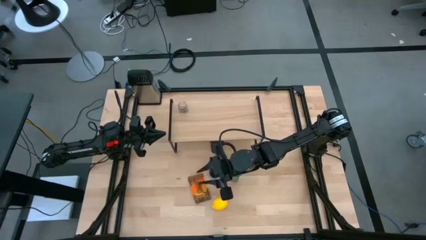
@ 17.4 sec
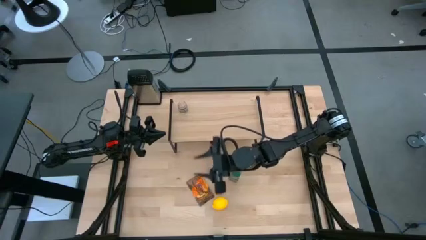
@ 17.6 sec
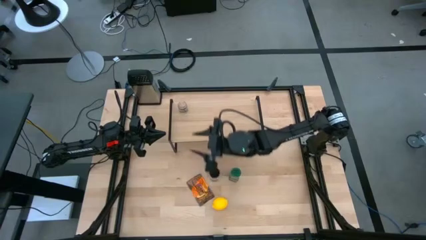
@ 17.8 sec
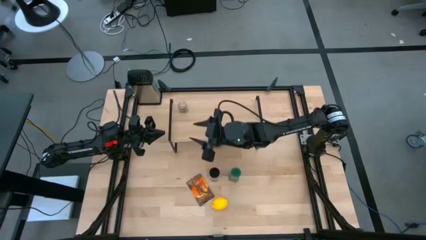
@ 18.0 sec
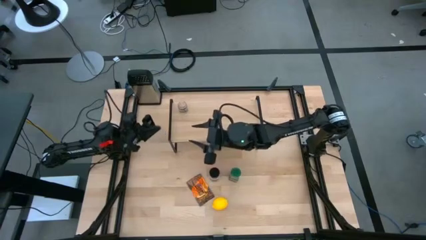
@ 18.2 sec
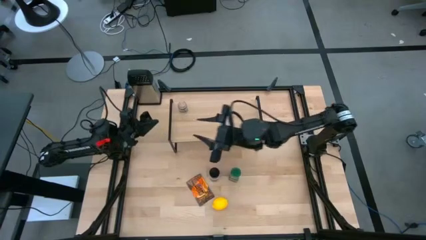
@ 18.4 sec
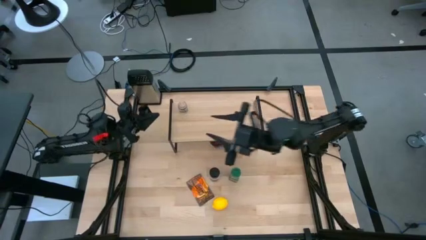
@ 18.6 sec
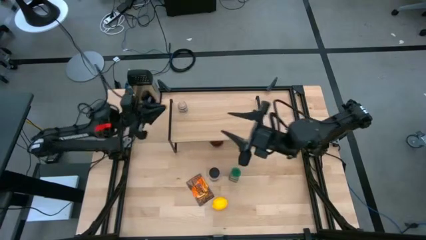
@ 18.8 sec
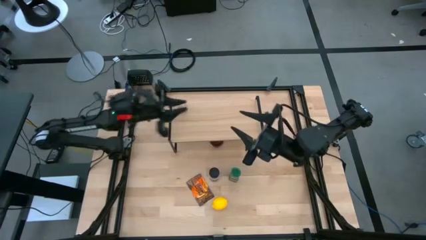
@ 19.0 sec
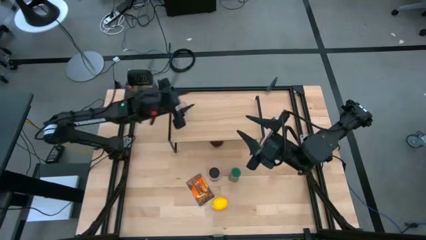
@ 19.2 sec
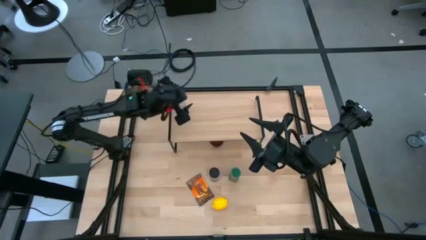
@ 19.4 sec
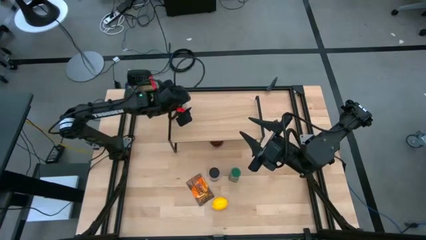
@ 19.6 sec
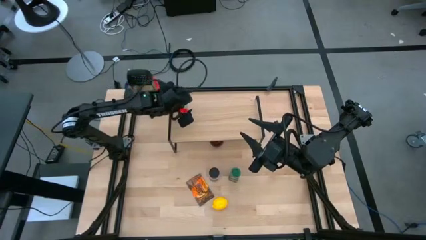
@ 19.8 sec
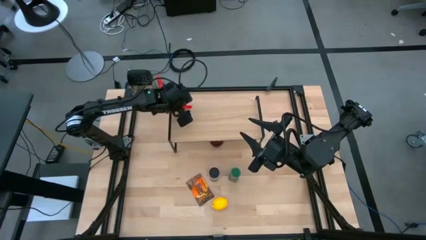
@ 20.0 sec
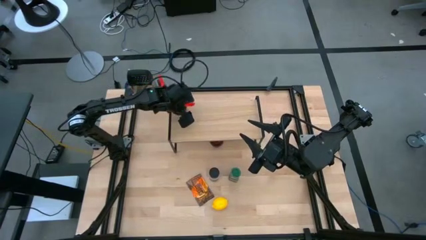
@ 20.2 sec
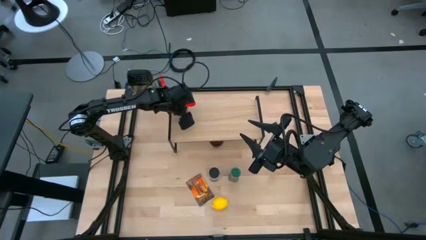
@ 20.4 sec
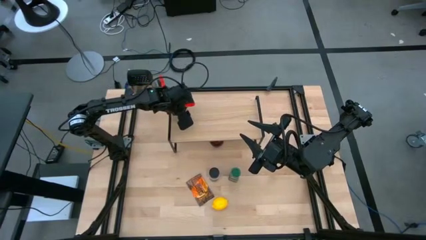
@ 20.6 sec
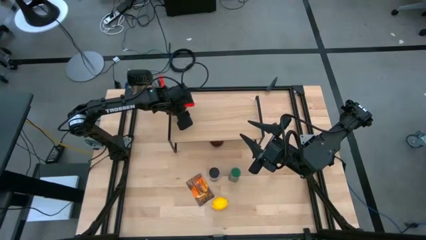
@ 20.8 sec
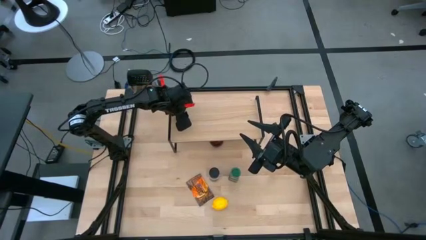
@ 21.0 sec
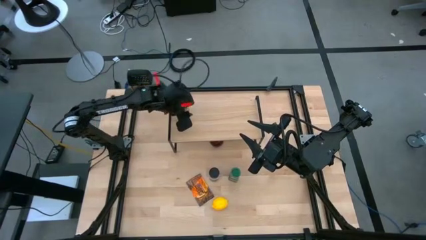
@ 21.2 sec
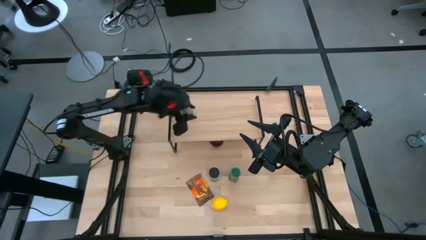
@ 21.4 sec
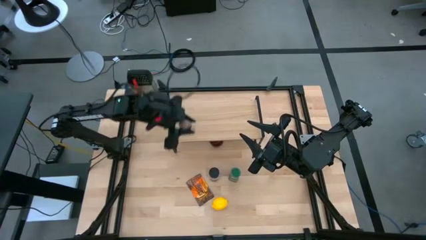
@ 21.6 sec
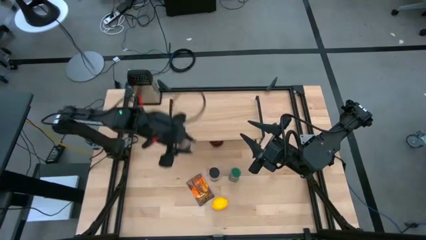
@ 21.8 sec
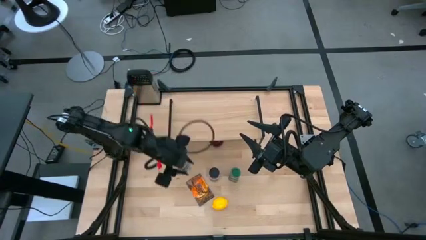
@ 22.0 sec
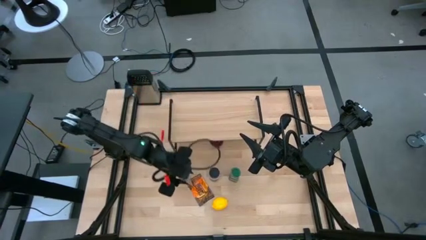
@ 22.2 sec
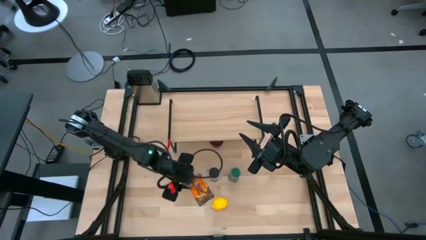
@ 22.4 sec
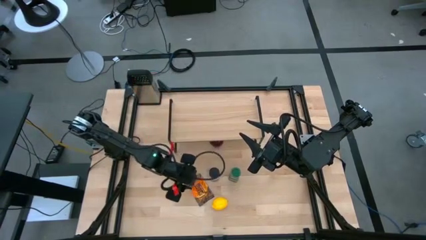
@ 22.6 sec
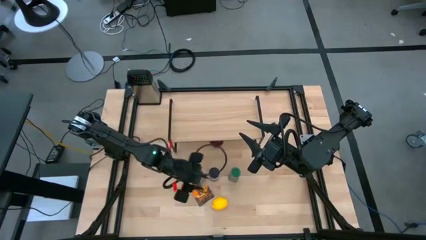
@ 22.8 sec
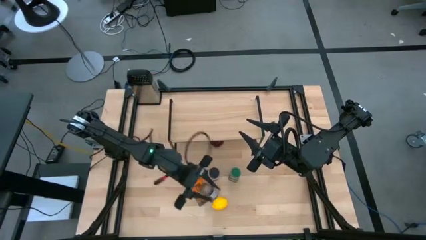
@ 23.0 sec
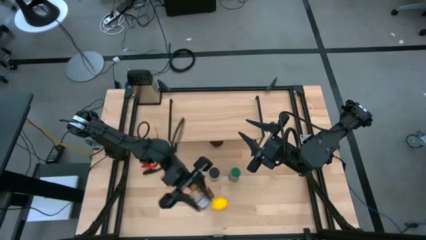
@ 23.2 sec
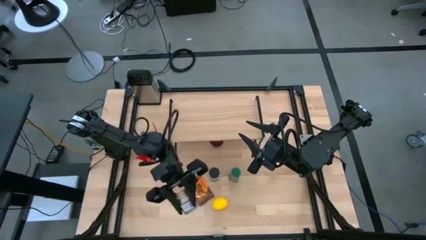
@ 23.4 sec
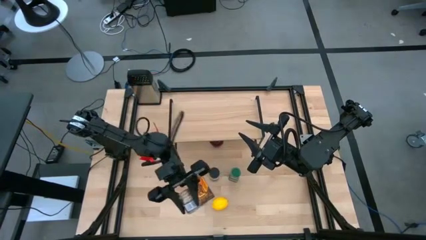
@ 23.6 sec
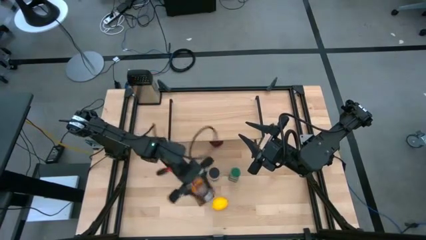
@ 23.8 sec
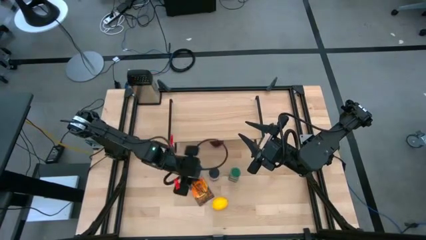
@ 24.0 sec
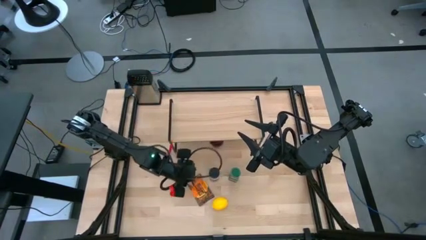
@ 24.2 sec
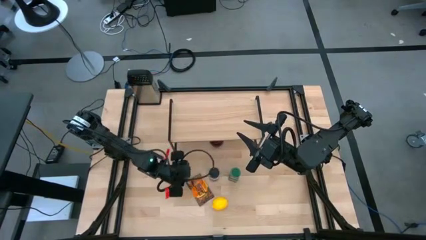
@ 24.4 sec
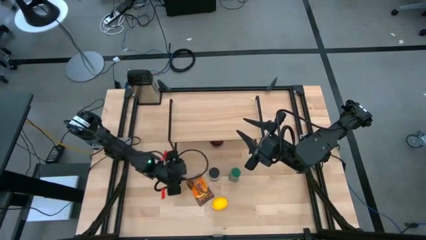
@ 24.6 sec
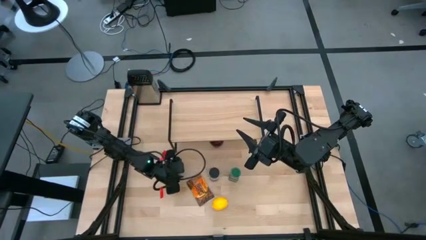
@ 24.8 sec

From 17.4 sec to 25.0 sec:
Task: Shelf spices
Remove the brown seasoning bottle from the shelf

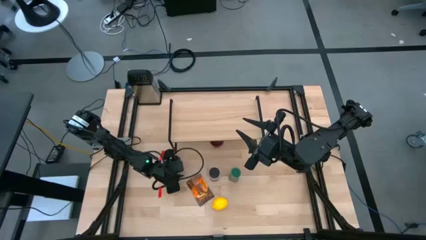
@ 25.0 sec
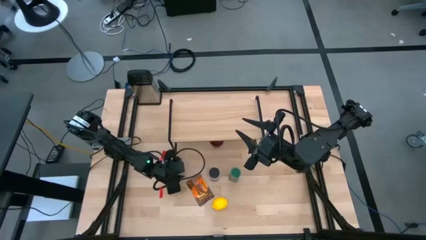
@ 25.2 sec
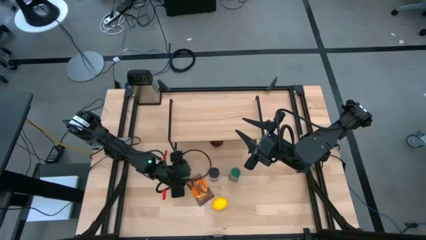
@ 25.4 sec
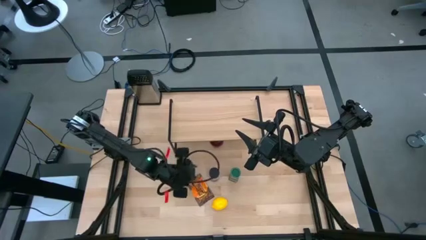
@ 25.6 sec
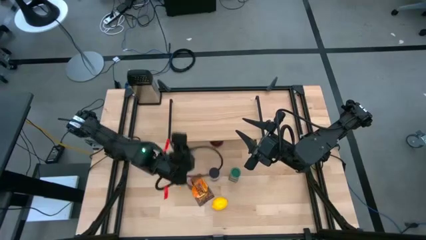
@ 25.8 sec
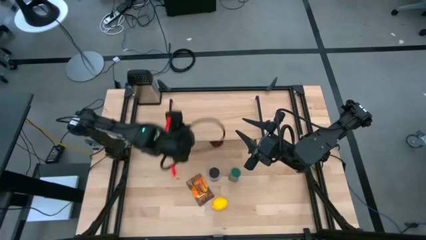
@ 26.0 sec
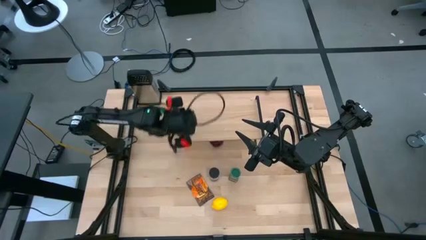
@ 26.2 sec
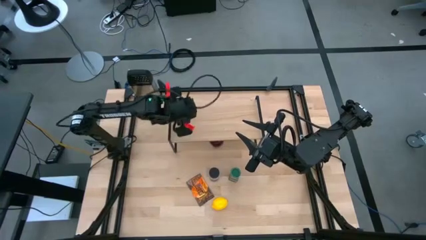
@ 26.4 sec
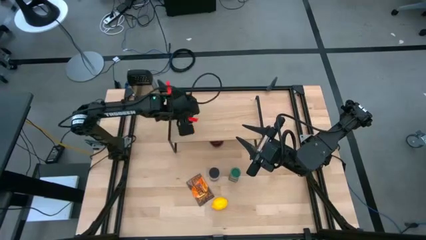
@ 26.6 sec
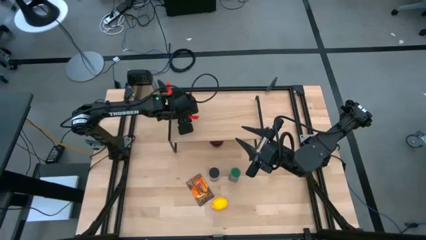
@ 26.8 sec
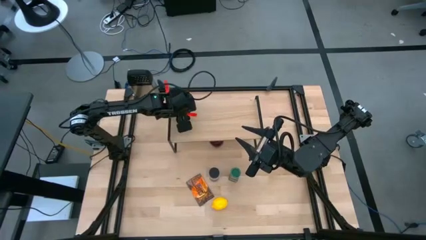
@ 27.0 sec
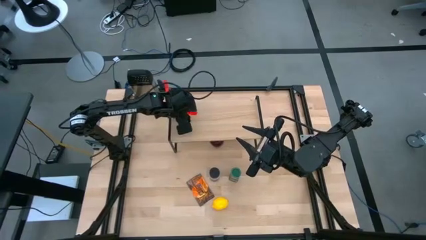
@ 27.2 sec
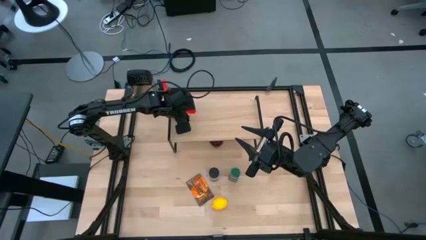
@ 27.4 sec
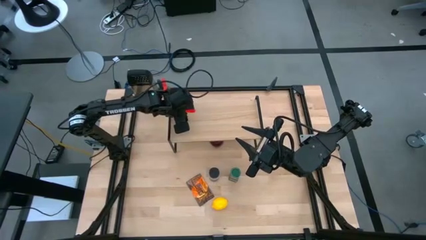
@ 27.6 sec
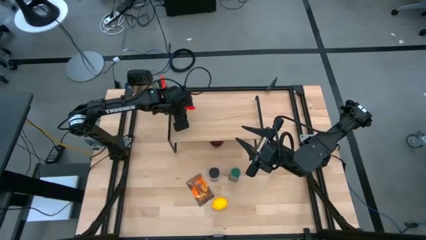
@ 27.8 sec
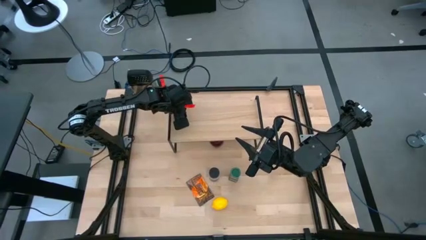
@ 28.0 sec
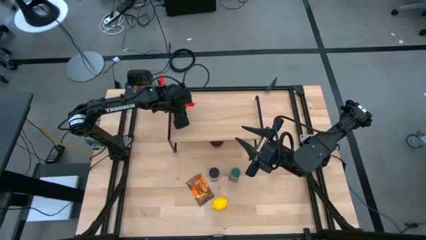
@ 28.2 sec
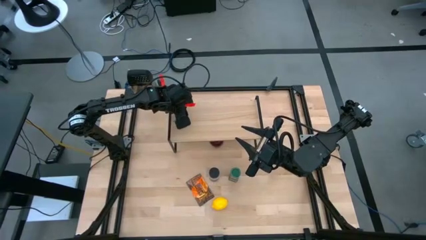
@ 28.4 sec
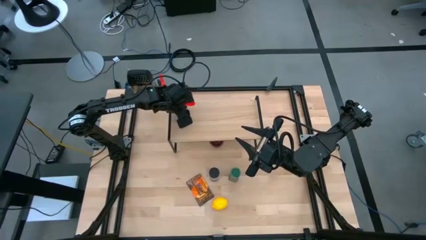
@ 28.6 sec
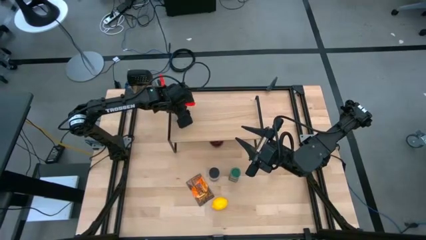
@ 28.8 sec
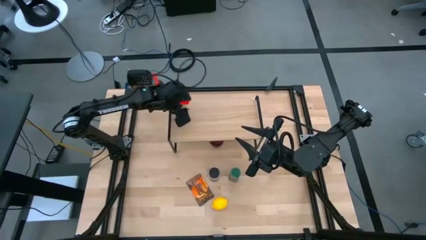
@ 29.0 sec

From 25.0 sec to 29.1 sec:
Put the brown seasoning bottle on the shelf

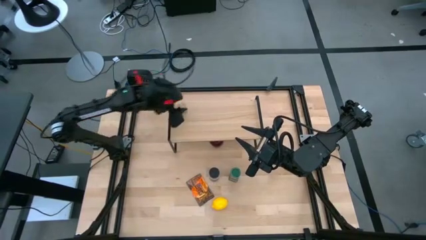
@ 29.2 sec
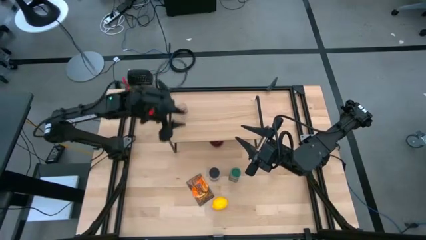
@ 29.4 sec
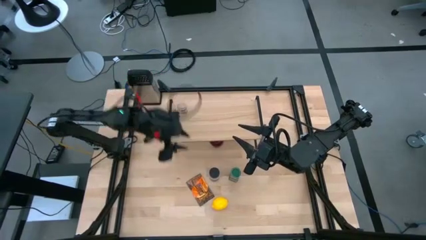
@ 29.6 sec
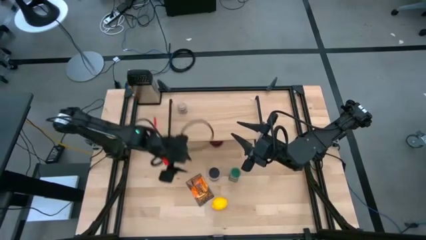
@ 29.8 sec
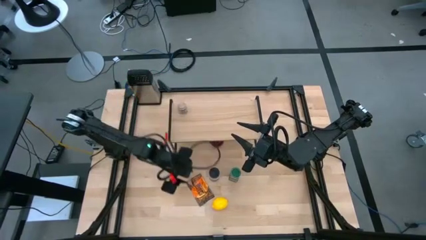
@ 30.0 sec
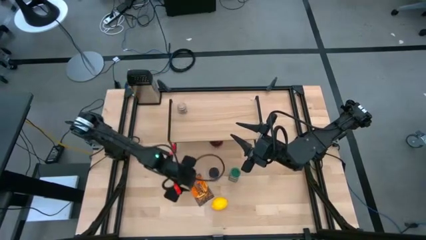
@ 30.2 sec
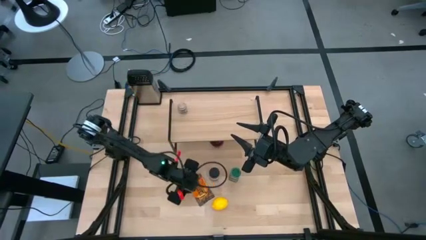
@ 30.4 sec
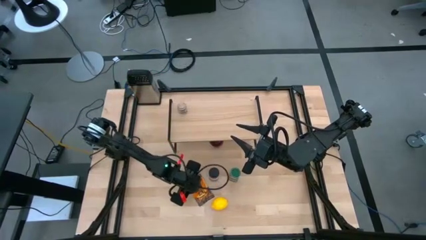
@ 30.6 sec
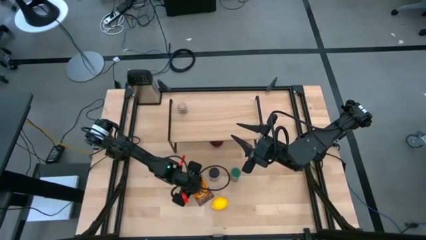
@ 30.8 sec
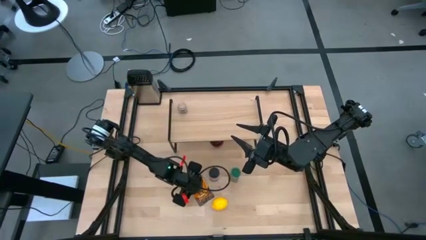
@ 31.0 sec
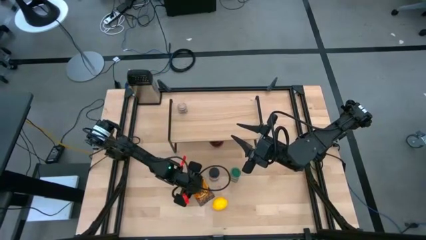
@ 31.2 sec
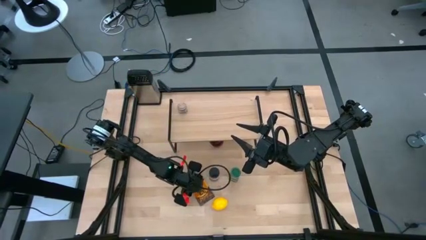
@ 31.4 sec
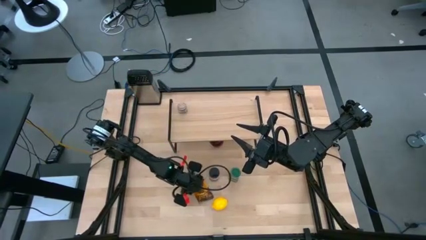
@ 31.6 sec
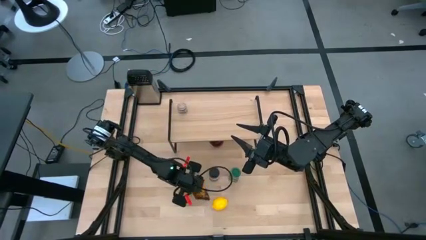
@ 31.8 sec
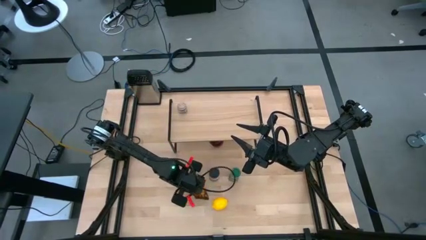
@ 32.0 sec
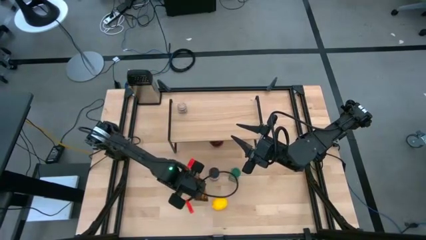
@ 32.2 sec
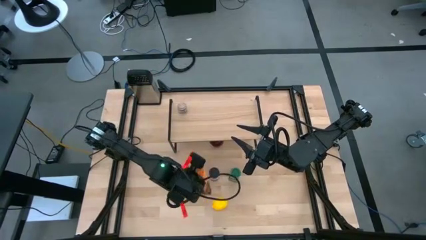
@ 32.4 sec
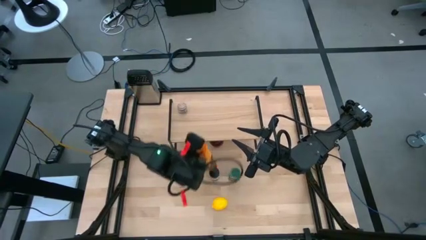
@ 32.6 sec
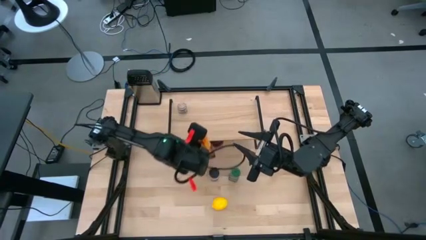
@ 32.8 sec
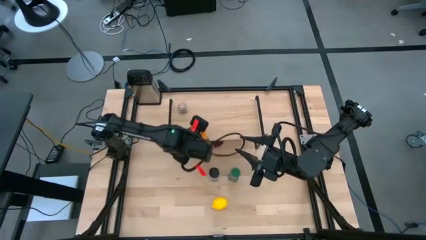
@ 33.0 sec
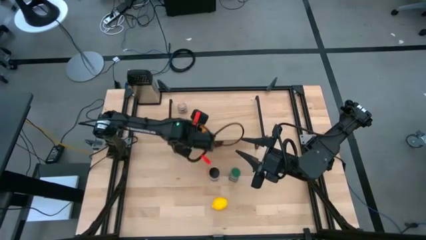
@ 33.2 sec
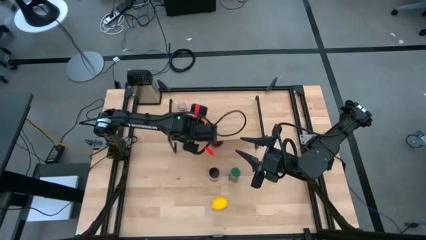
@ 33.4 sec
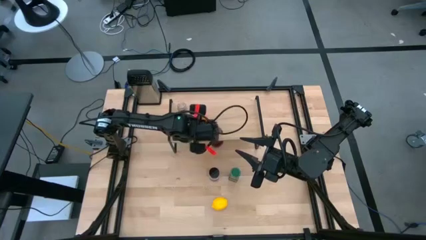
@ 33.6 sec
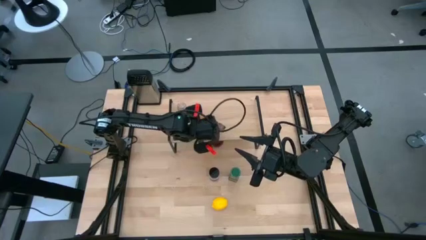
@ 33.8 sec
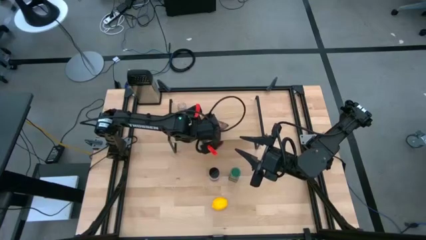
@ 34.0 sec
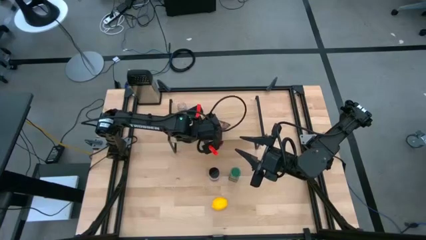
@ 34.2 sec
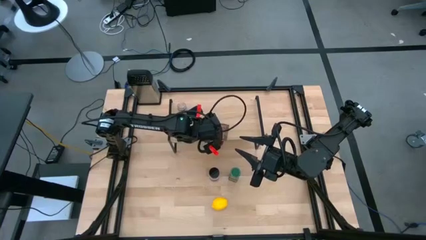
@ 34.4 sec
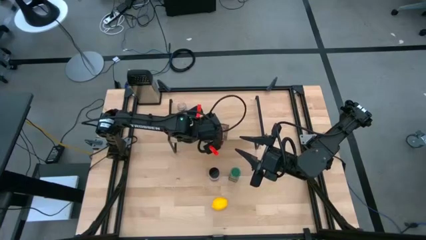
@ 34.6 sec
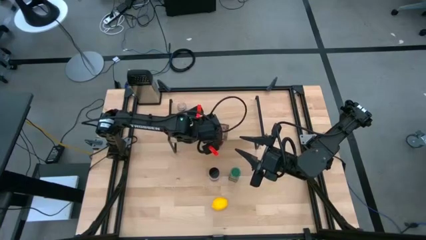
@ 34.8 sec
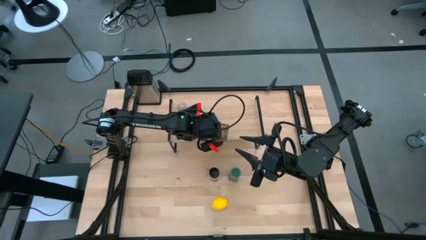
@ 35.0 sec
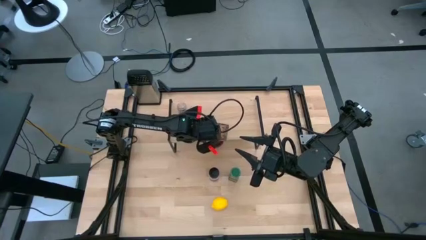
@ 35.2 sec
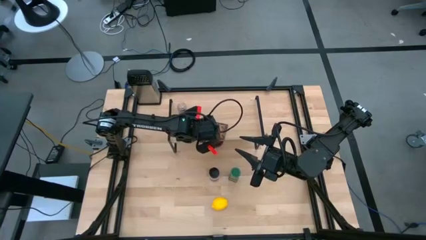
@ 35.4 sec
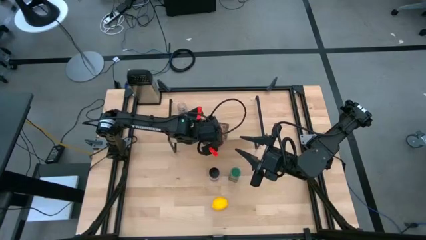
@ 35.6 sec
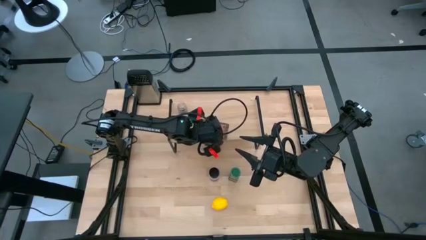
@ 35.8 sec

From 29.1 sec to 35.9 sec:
Put the orange seasoning bag on the shelf
